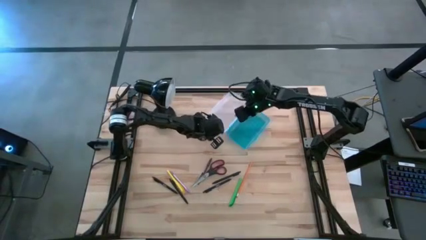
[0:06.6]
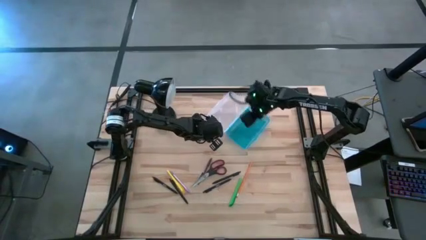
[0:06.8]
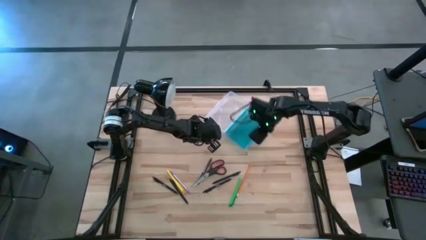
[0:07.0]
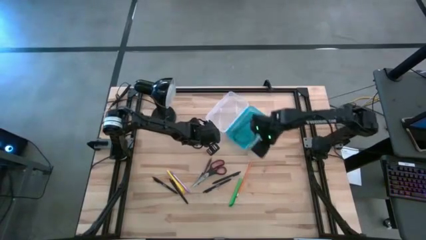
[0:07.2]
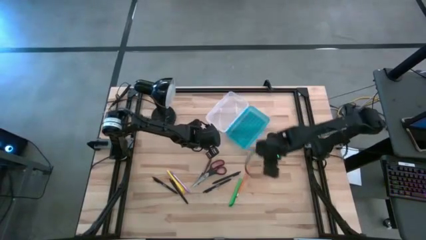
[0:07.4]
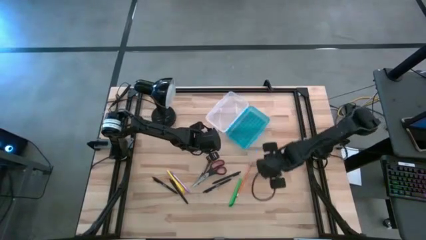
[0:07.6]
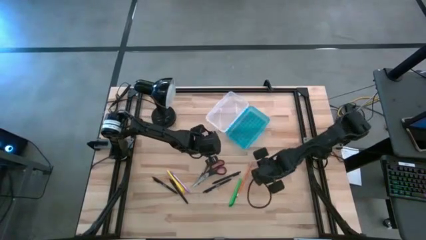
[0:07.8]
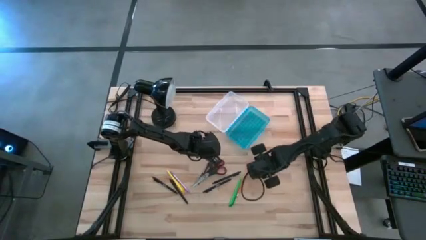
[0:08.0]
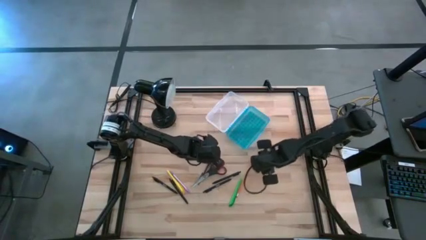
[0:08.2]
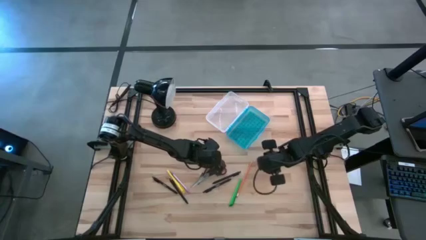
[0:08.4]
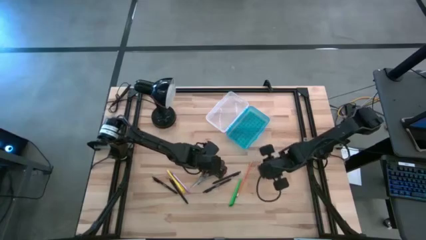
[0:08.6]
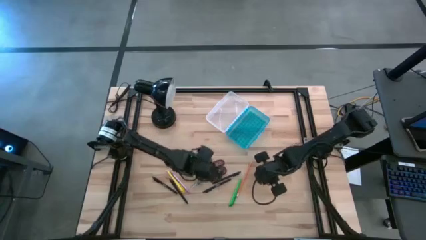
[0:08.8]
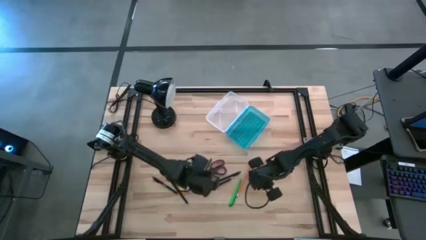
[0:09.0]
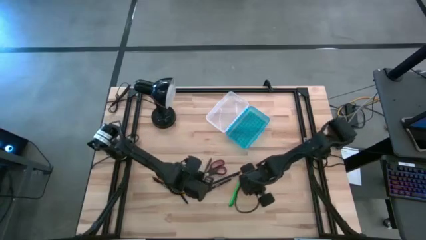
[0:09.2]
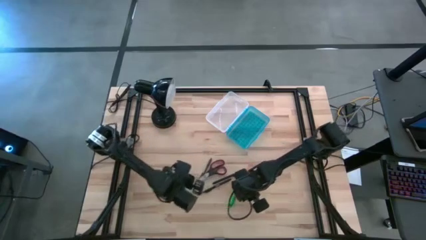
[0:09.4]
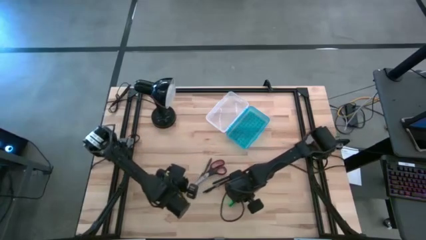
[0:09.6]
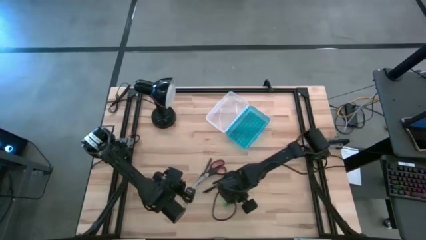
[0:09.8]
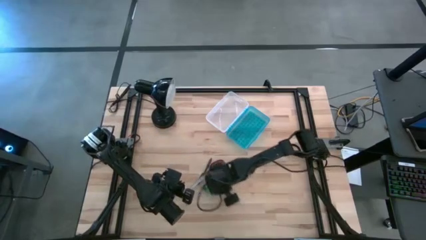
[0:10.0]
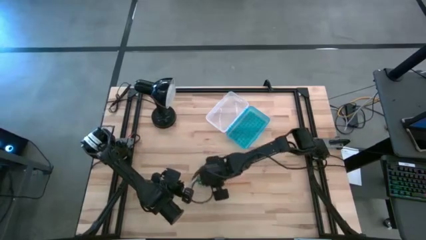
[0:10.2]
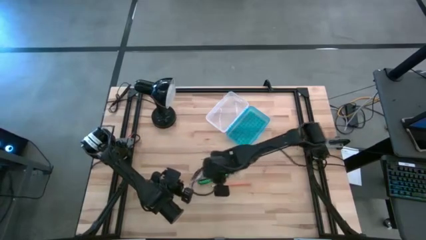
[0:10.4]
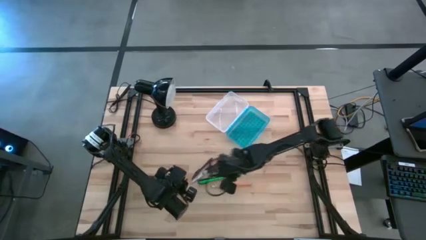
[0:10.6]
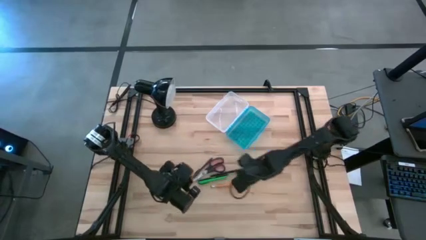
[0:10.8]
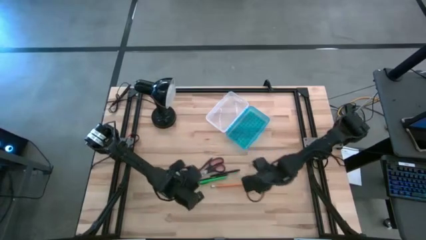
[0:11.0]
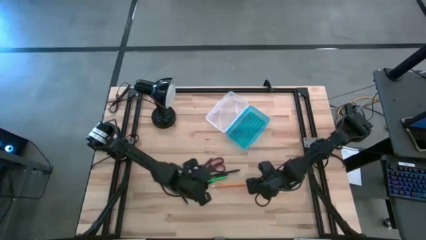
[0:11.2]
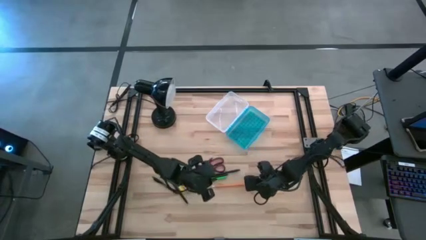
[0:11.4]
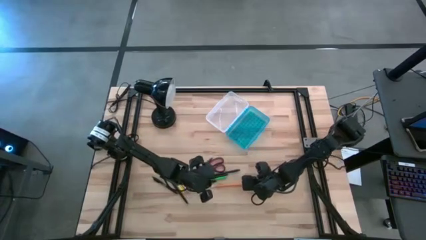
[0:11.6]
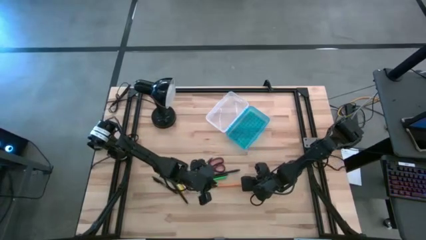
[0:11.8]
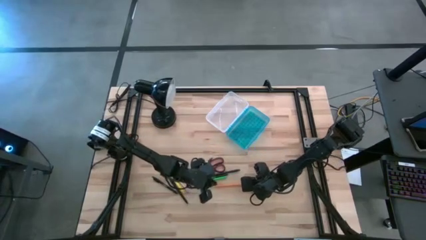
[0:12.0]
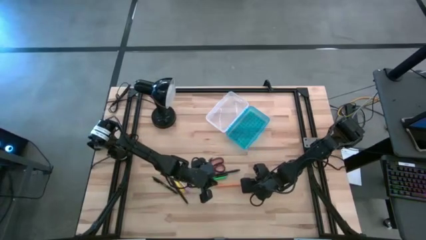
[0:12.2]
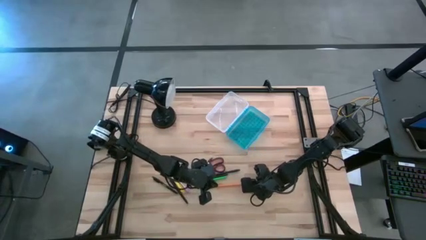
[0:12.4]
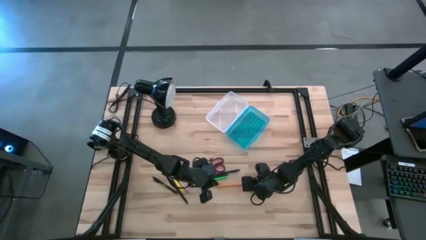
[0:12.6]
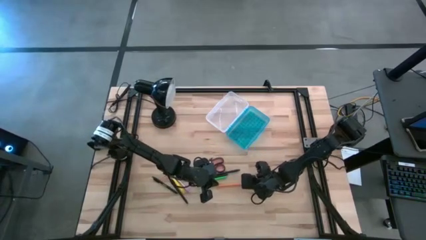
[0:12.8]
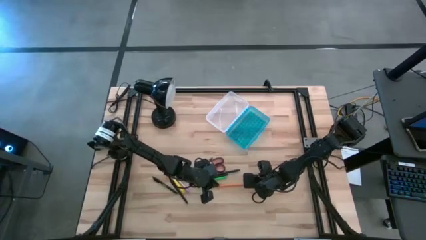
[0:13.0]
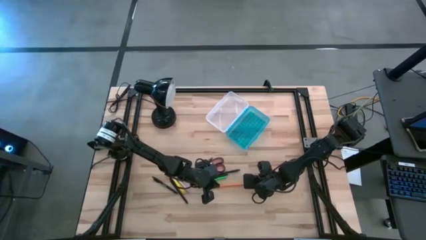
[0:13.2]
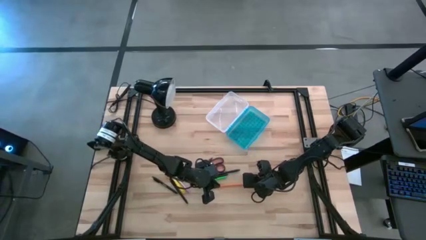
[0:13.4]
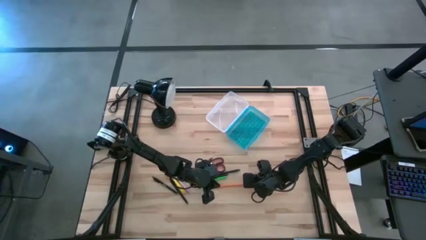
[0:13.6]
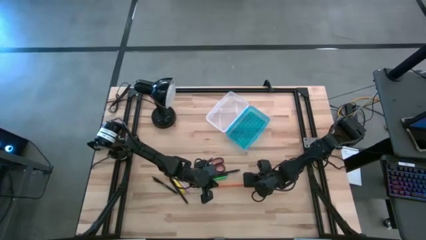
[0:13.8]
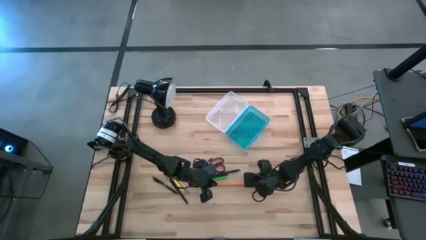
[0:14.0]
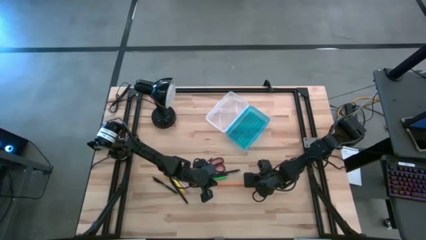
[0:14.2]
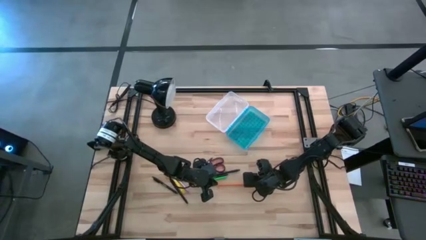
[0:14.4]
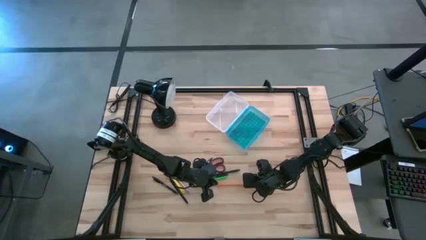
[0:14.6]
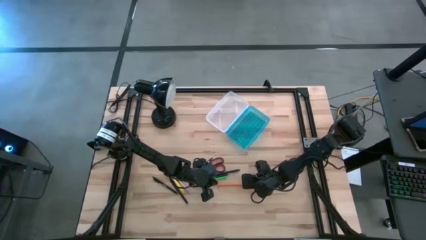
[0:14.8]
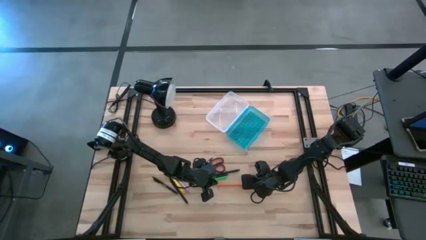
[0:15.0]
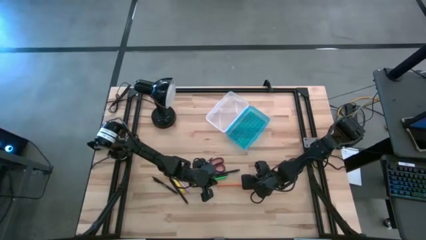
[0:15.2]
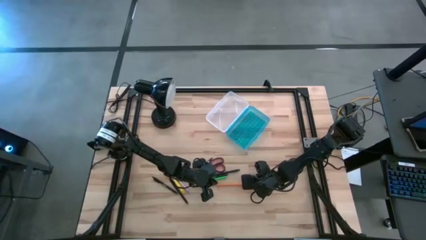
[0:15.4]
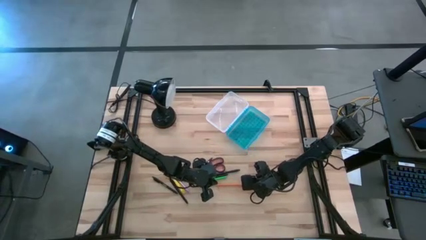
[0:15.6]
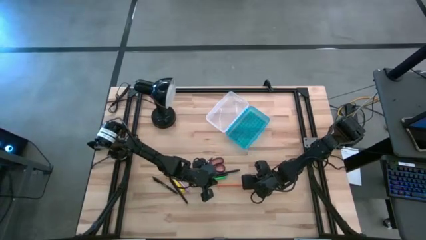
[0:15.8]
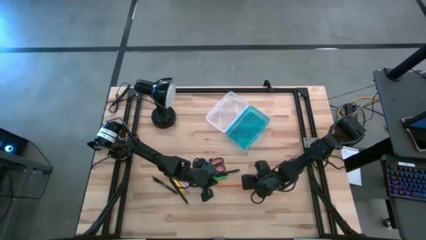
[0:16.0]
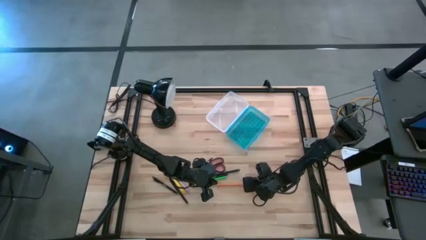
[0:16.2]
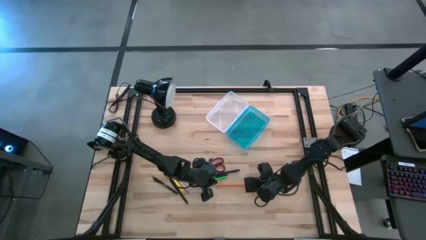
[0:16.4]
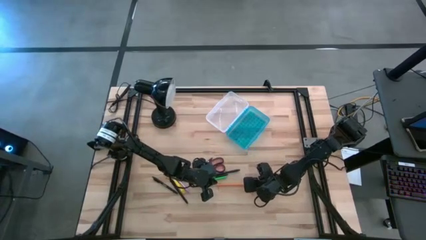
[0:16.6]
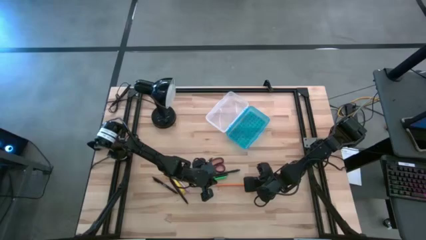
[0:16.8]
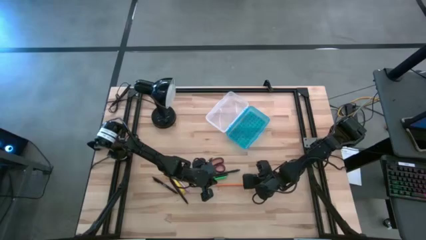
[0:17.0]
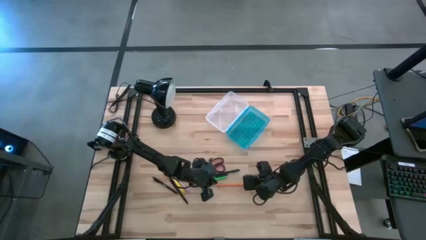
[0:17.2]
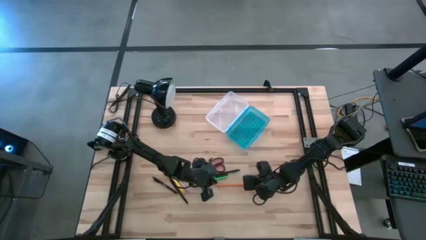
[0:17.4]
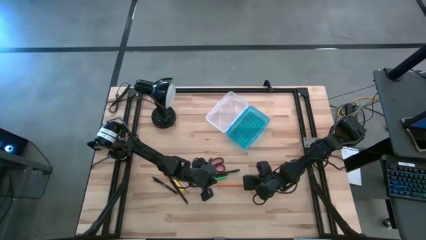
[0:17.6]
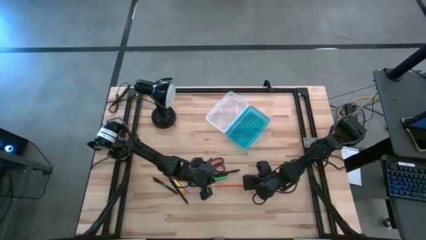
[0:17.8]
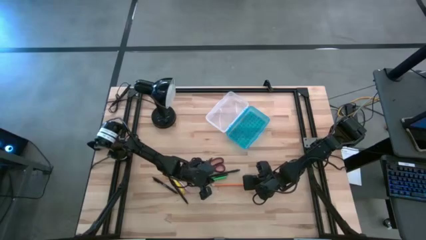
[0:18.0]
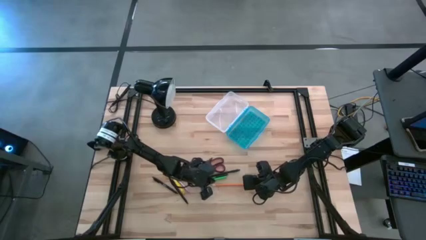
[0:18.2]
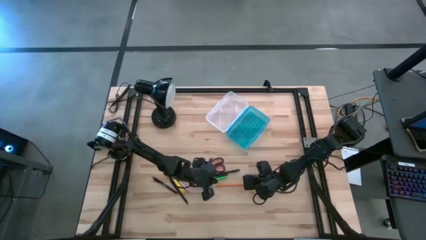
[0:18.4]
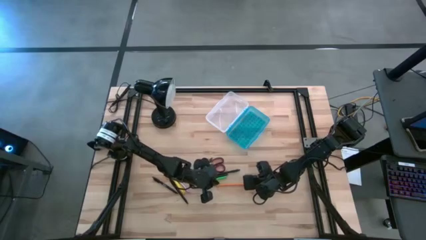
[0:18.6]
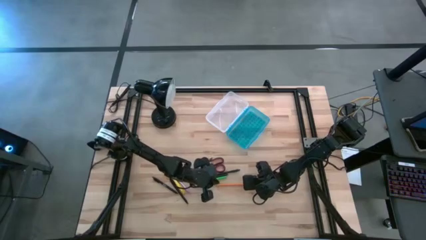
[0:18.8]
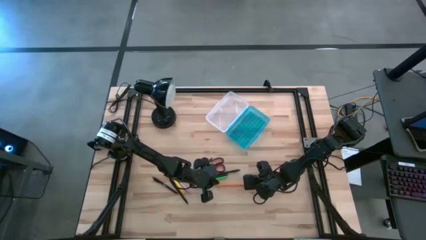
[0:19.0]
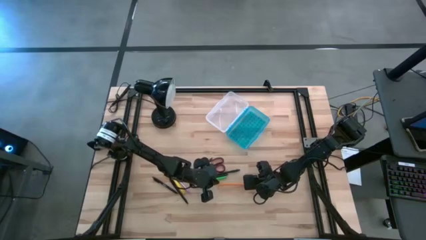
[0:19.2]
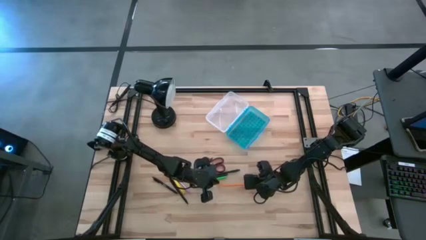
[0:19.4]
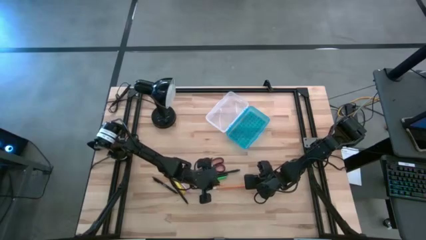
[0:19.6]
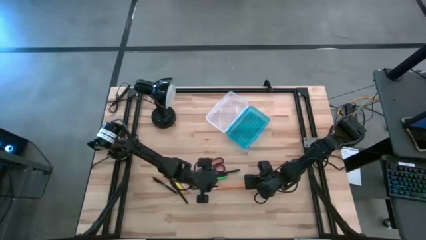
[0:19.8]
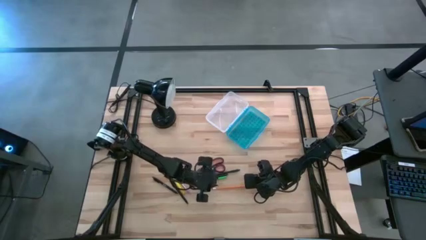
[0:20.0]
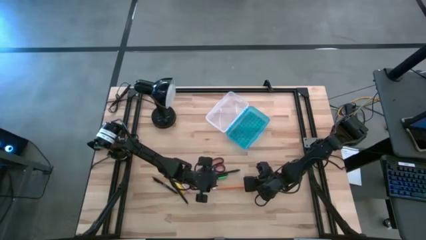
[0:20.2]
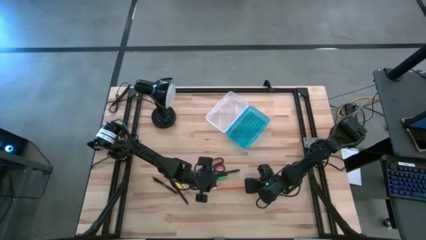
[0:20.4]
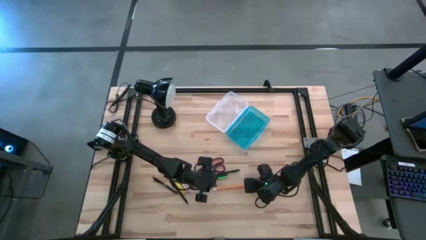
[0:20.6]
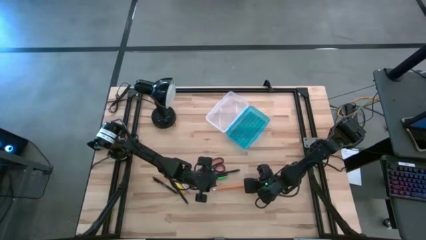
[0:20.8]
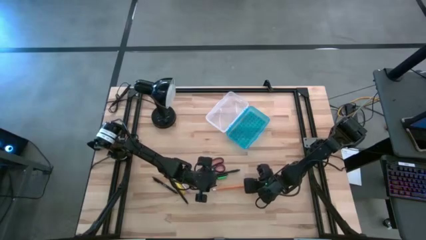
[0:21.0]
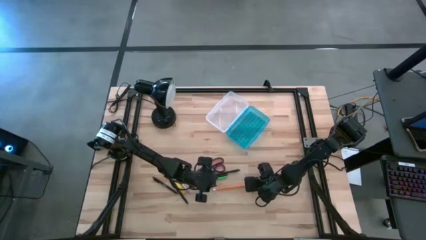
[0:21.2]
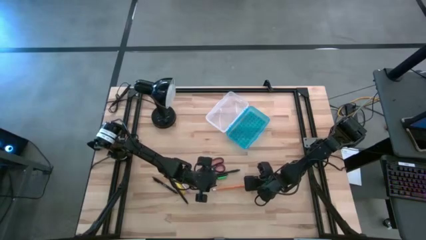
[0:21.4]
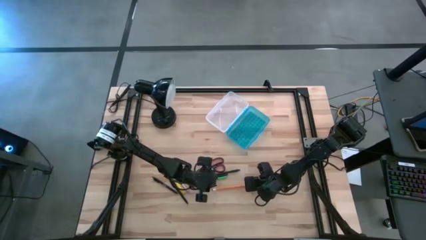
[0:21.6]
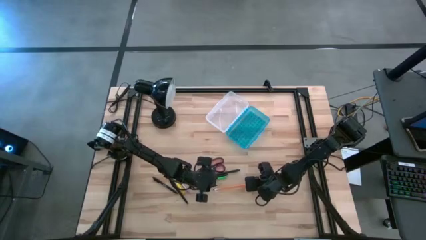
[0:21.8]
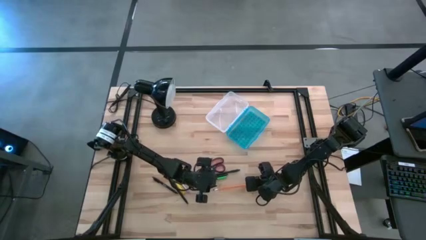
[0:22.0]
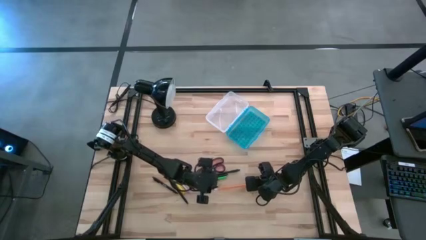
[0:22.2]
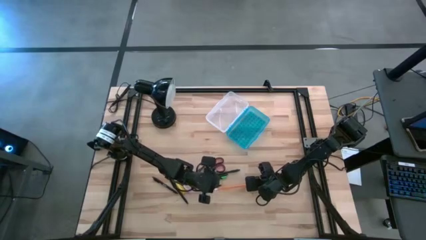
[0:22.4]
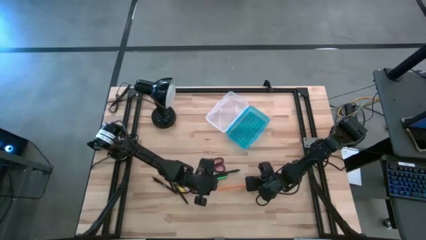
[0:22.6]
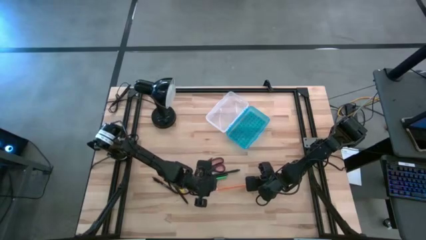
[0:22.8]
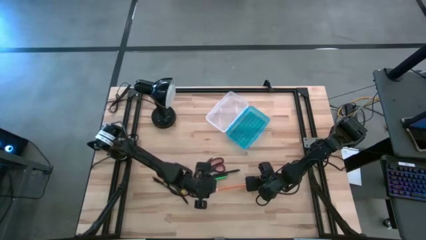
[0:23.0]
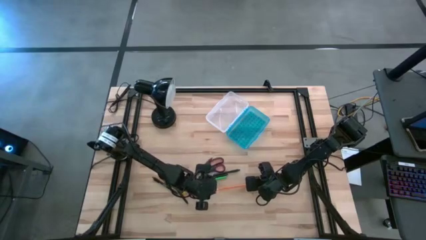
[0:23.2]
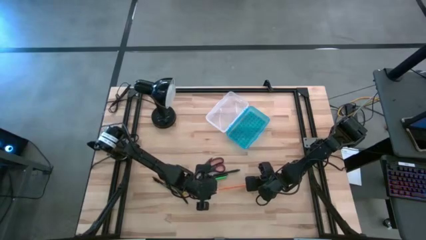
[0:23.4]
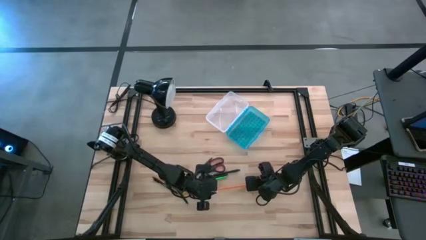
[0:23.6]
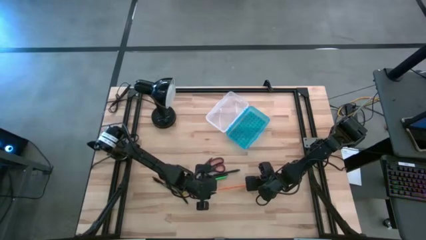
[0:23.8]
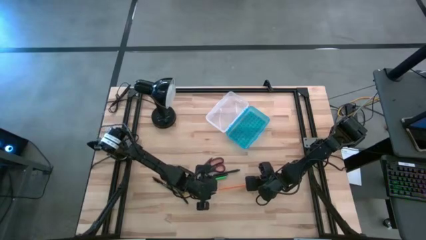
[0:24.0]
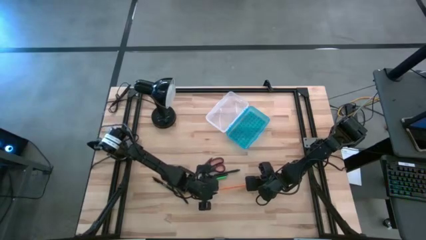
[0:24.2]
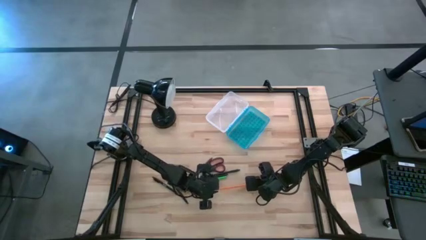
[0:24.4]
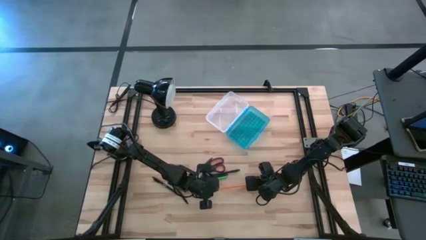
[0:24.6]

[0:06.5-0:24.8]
Task: Pick & place school supplies into a supply box
Put the orange pencil into the supply box
